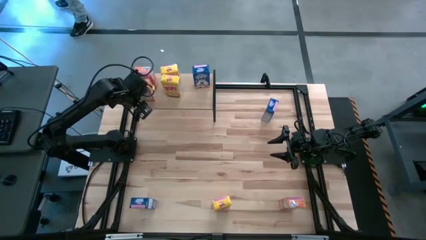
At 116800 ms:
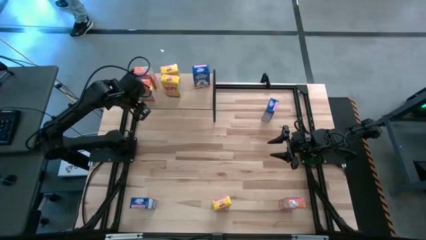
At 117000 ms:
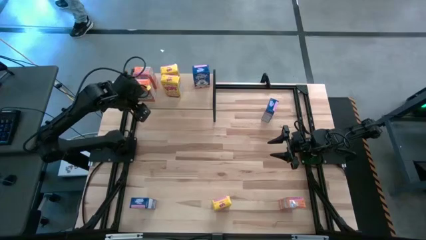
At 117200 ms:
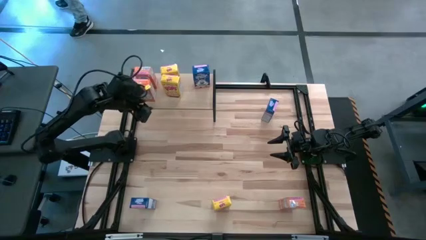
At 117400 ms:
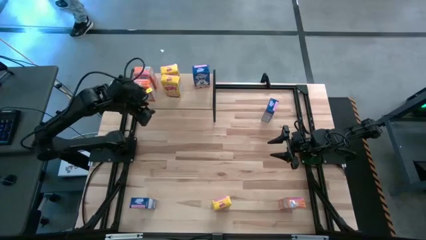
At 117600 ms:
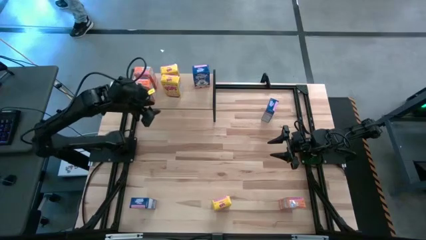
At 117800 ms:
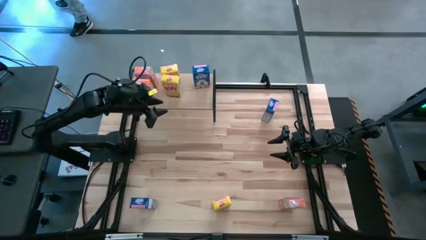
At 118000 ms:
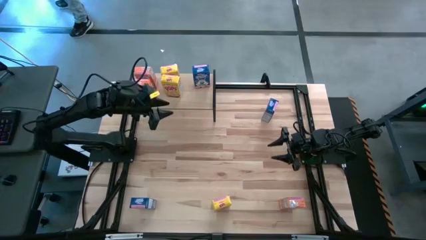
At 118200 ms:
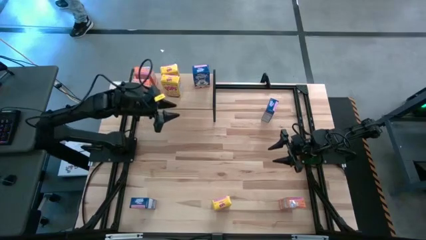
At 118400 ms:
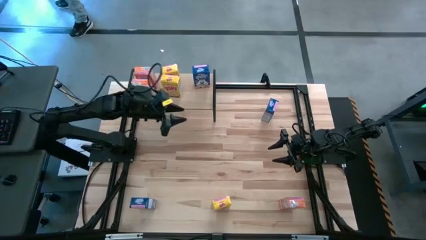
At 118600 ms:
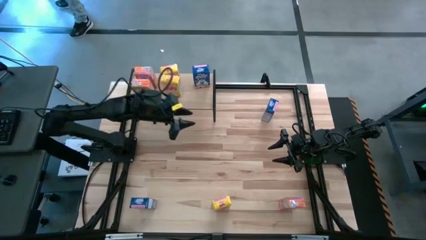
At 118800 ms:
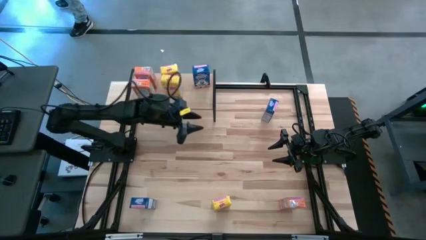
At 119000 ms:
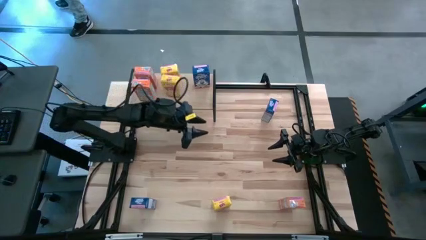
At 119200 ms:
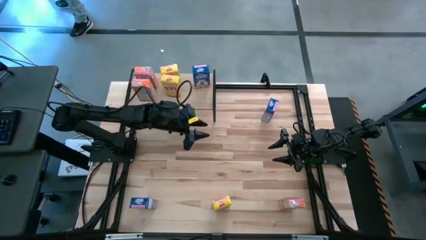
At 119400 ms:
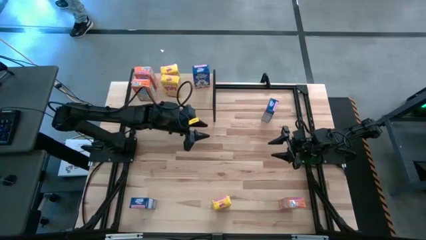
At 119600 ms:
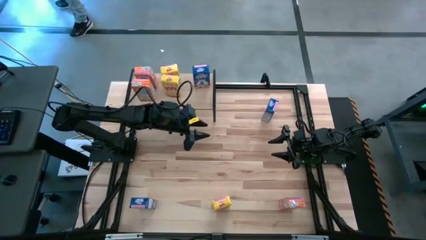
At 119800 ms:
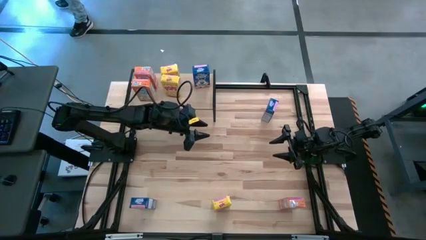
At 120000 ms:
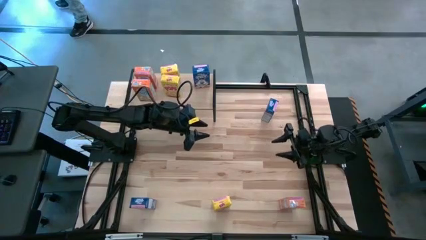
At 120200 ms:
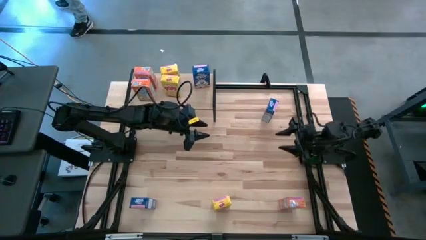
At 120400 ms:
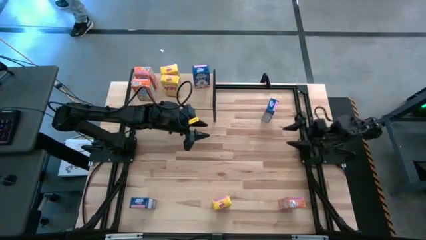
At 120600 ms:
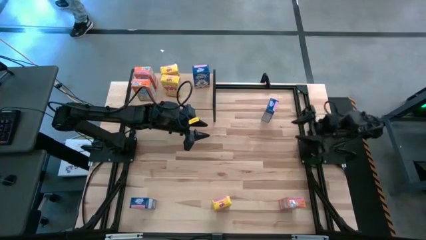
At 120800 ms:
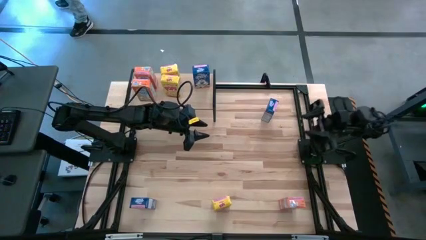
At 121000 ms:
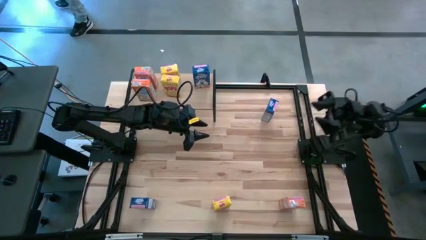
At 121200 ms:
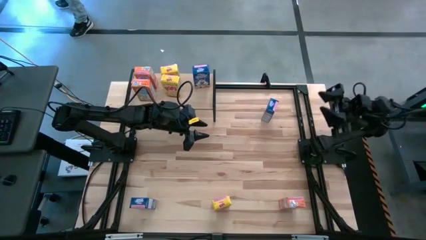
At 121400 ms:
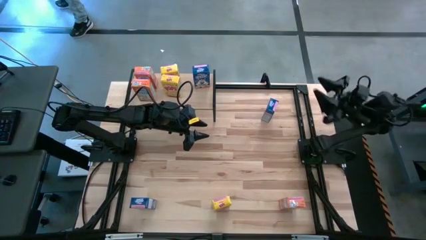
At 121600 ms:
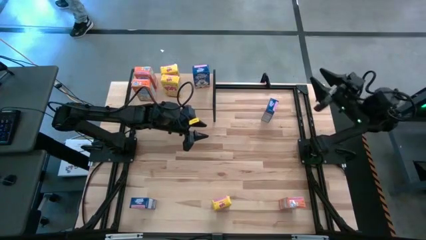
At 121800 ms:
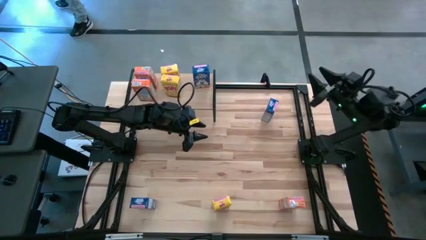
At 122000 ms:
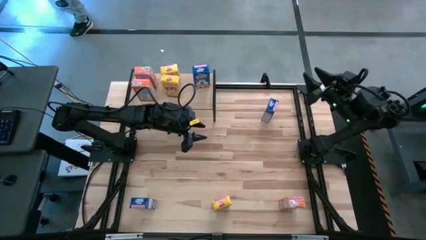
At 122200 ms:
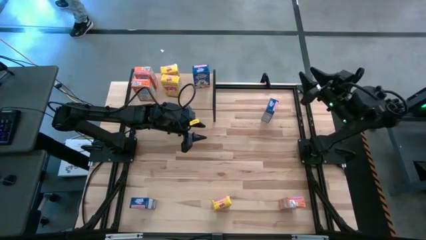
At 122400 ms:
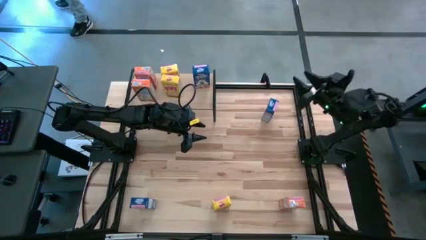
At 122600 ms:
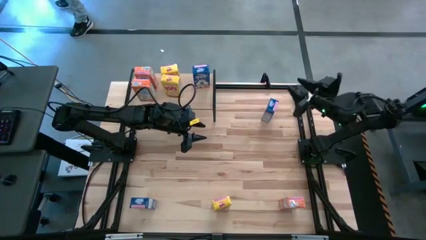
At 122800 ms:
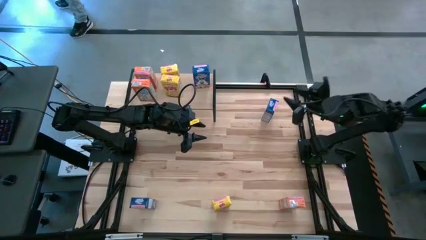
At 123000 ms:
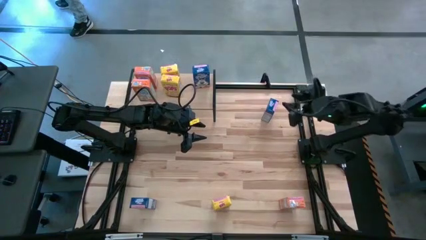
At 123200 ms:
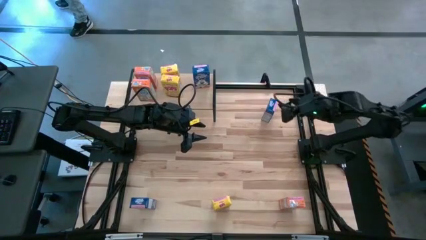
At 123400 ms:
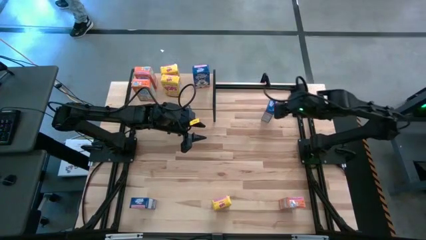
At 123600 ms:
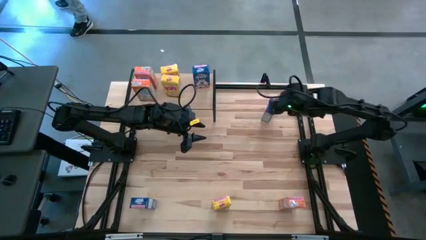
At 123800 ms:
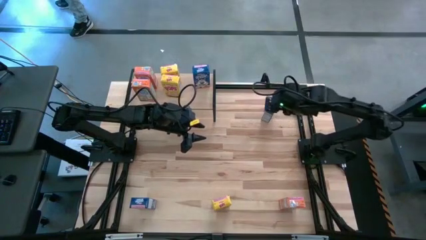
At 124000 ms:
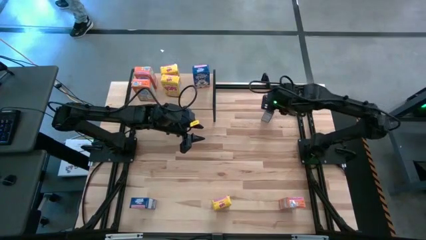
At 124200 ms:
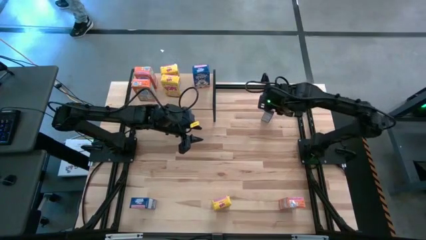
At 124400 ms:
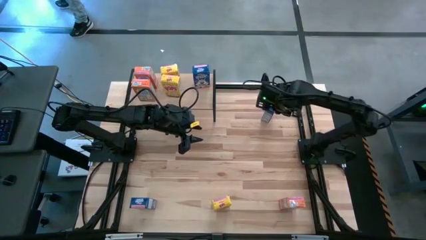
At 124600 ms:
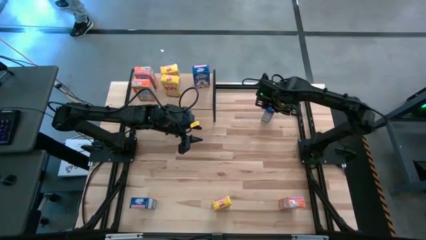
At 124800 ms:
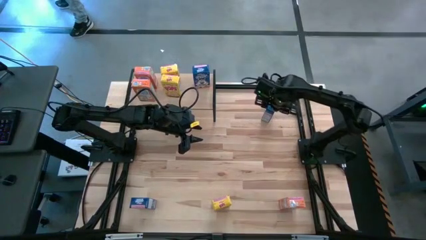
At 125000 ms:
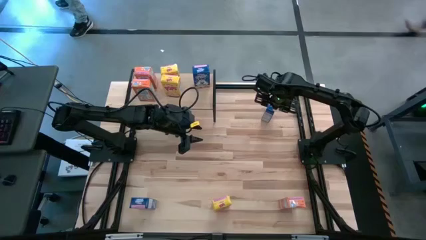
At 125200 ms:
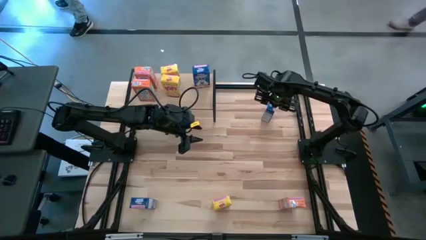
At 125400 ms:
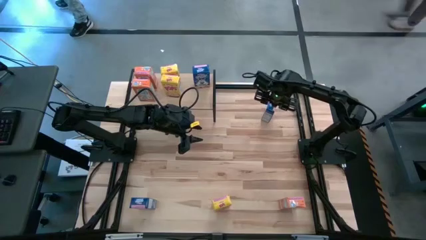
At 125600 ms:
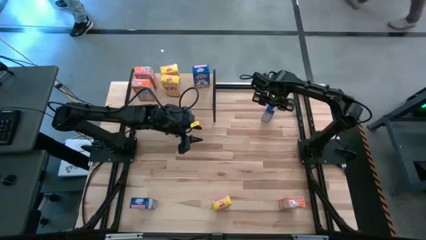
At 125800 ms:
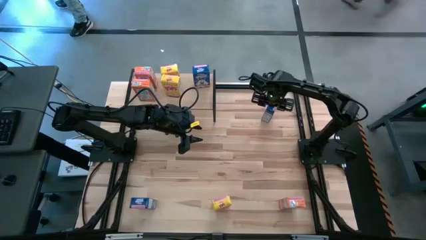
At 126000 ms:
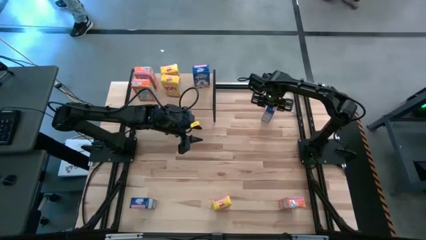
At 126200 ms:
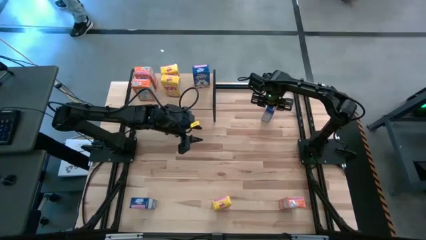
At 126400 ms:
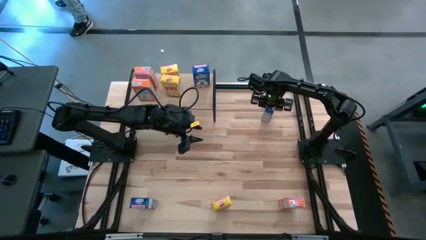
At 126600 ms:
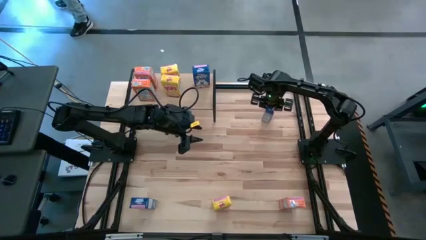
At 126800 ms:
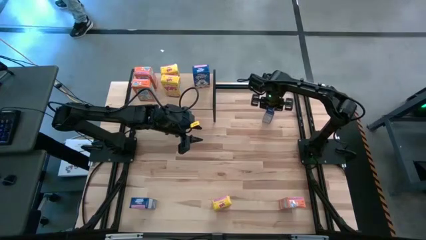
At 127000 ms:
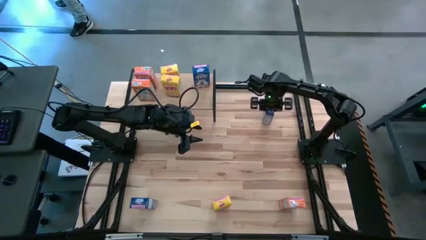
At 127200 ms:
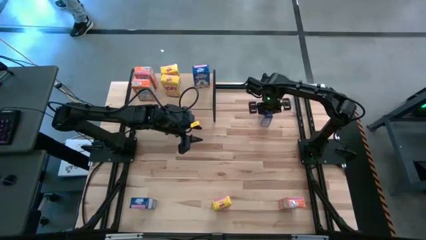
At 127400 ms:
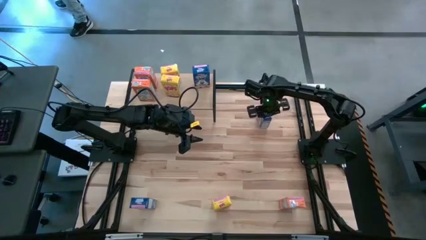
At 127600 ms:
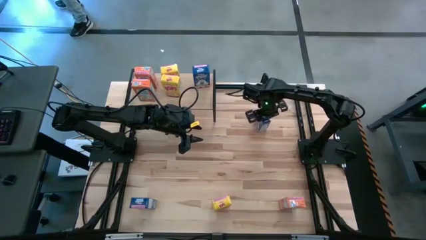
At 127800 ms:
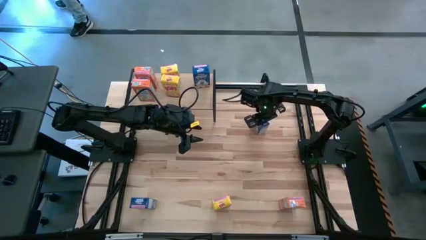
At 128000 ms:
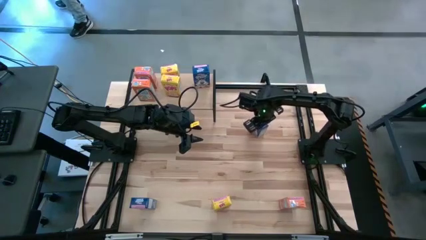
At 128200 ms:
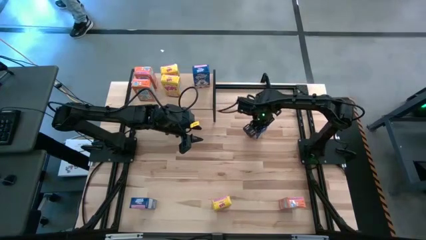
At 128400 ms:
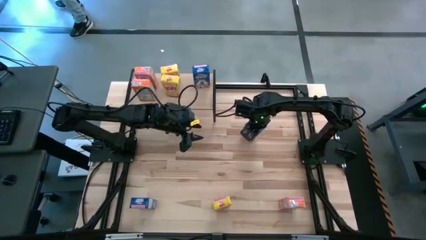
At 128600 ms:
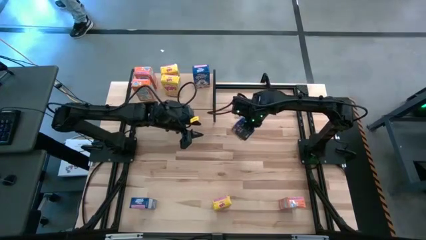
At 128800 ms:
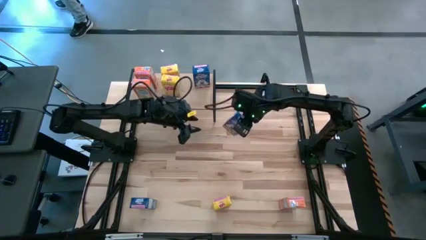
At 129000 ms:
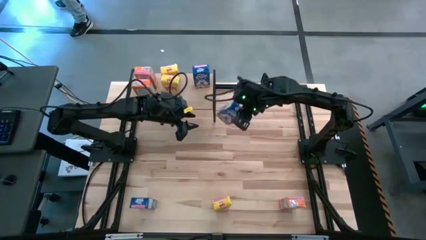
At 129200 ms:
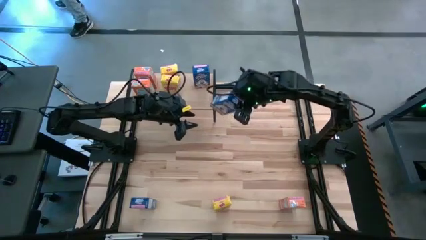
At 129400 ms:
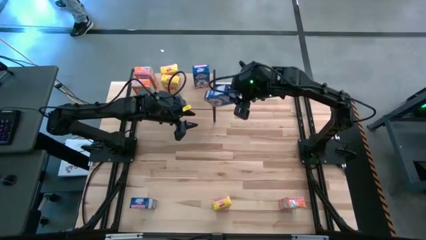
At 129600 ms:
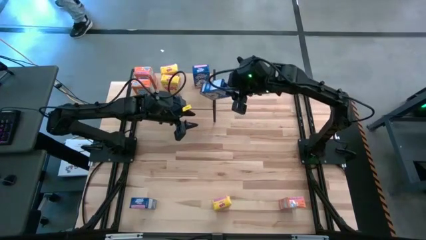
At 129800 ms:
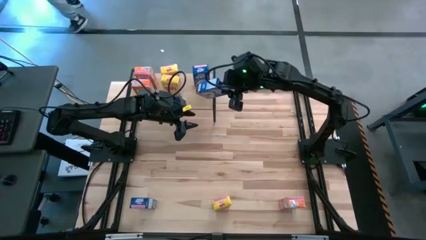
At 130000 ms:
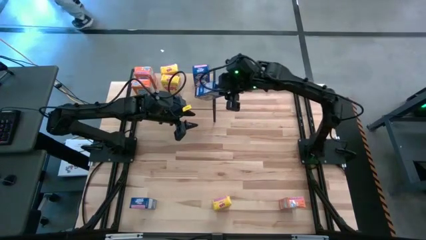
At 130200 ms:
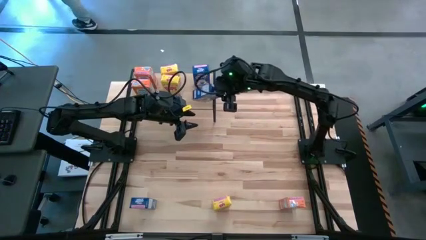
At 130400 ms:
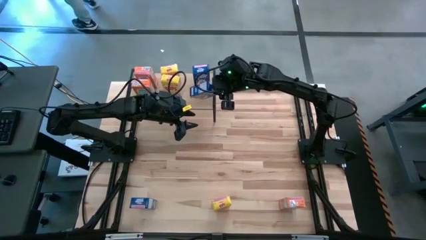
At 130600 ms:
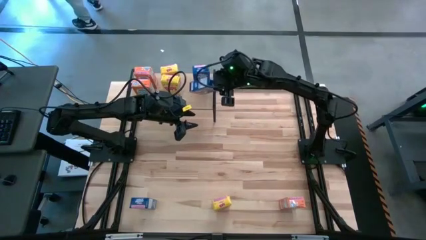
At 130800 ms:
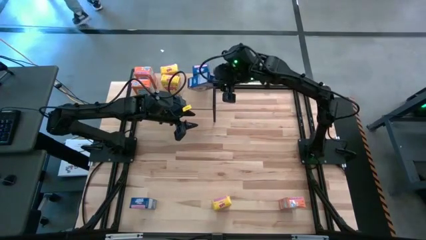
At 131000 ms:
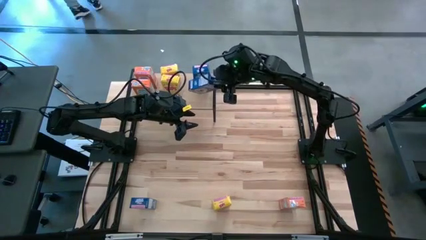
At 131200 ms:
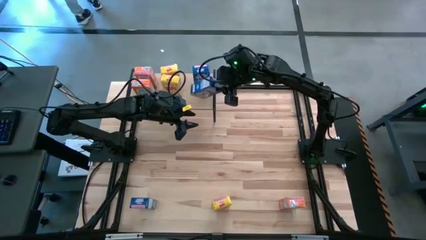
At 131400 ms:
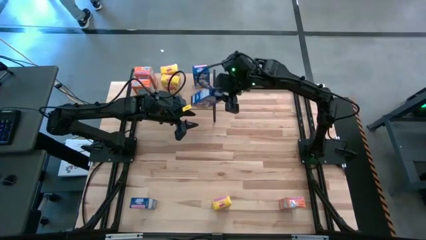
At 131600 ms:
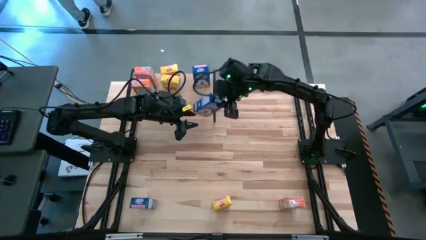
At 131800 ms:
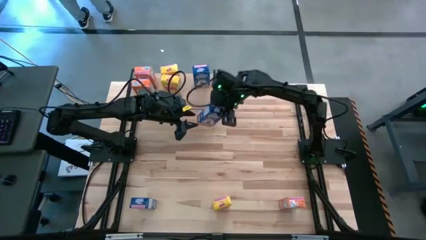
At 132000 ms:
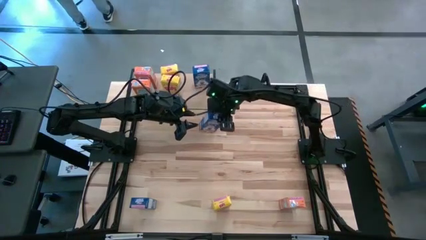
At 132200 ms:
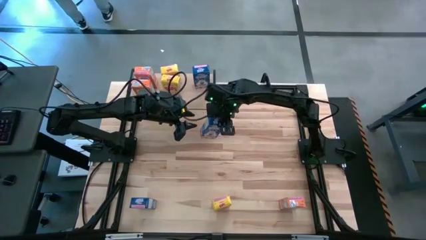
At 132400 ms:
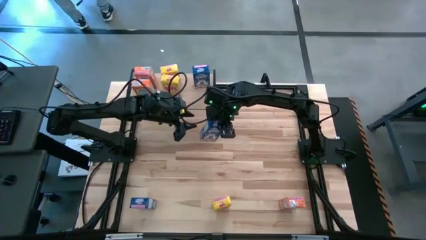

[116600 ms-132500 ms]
Task: Stack cereal on shelf
Put the top blue cereal box on the shelf aligned with the other blue cereal box

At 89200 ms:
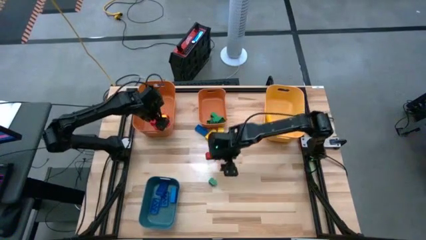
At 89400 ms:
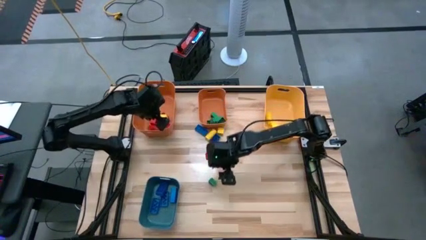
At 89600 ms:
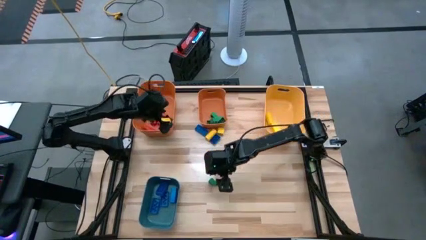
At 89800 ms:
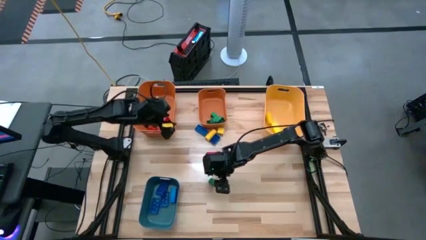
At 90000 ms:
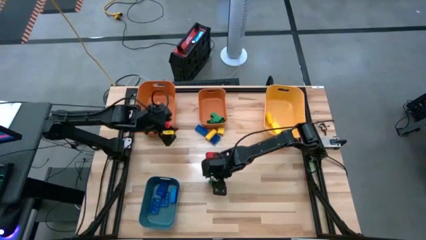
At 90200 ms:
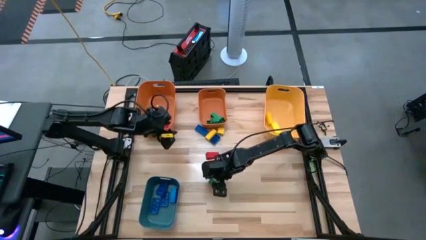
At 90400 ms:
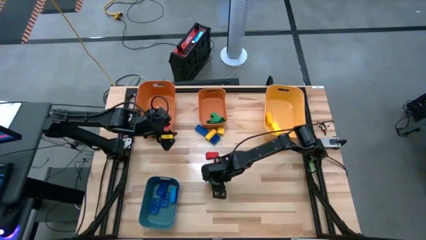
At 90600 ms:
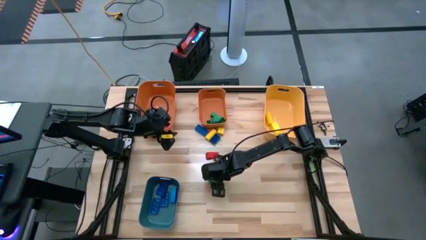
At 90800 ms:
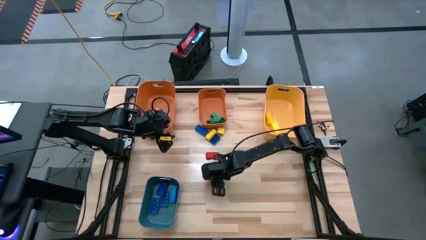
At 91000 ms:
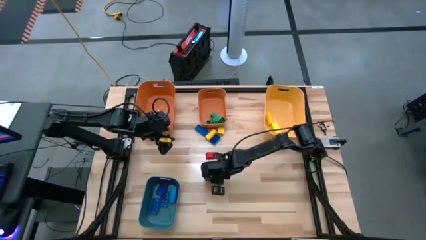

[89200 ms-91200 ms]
Task: Sort blocks
Put the green game piece into the right orange bin
